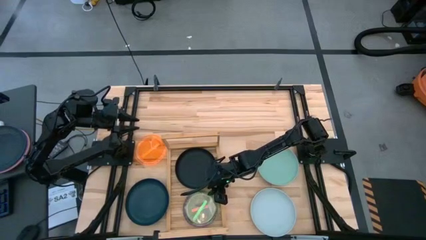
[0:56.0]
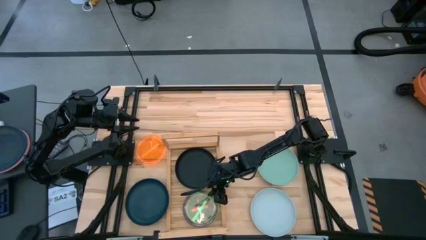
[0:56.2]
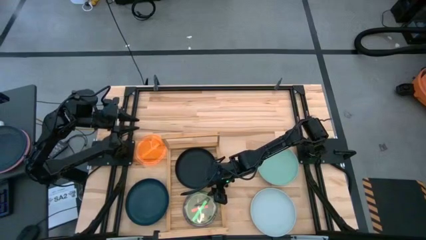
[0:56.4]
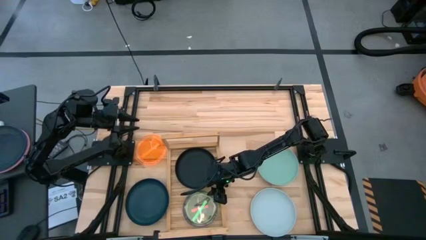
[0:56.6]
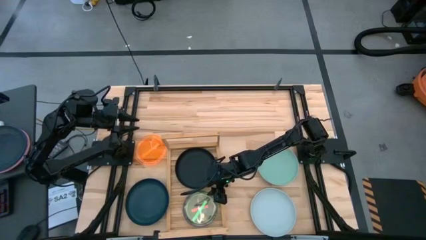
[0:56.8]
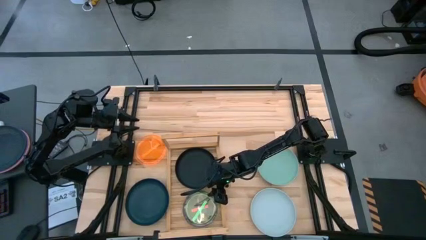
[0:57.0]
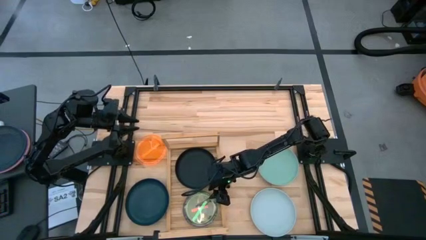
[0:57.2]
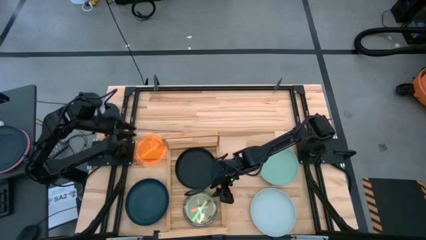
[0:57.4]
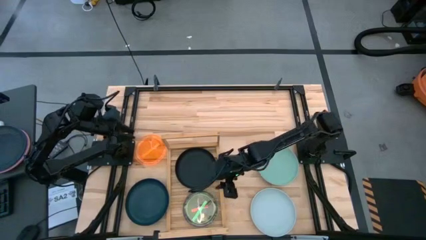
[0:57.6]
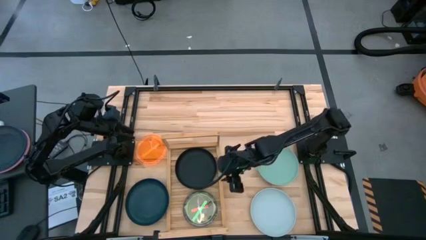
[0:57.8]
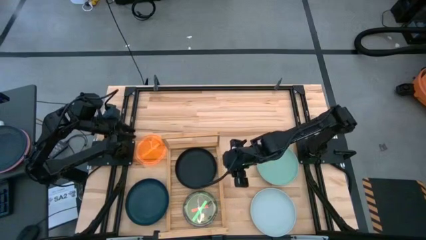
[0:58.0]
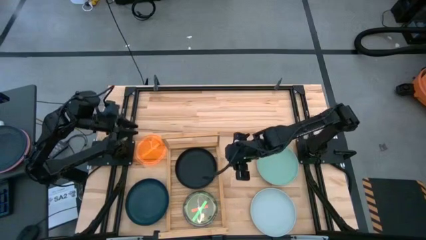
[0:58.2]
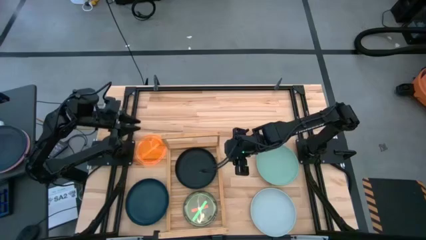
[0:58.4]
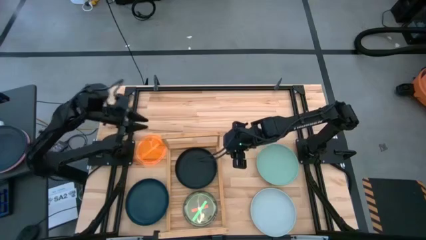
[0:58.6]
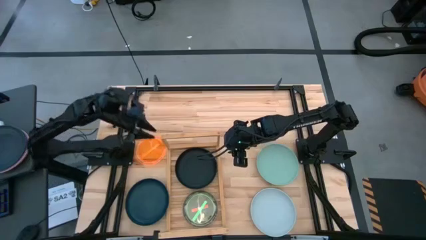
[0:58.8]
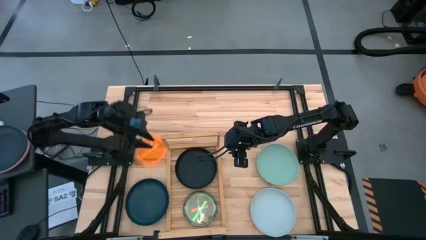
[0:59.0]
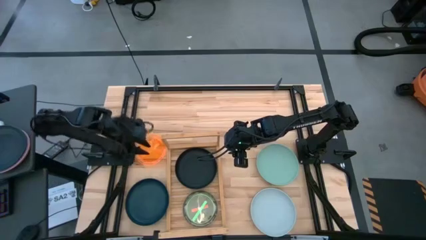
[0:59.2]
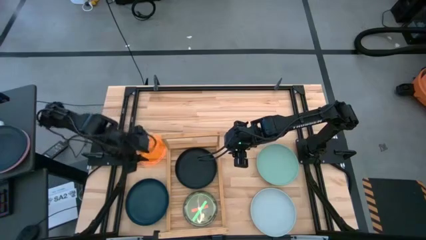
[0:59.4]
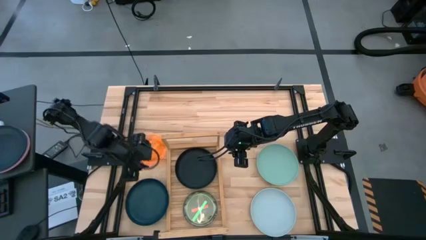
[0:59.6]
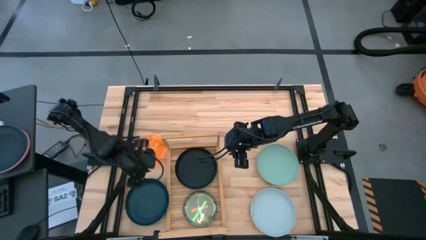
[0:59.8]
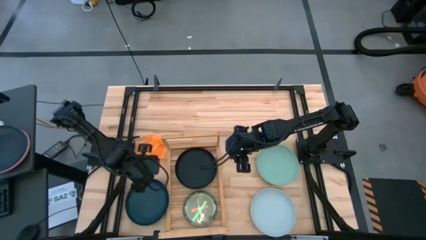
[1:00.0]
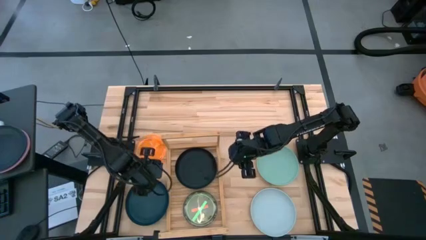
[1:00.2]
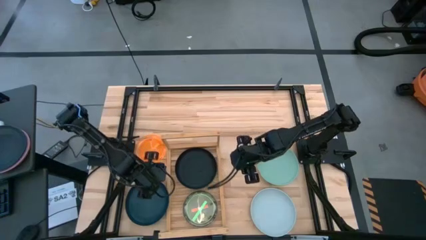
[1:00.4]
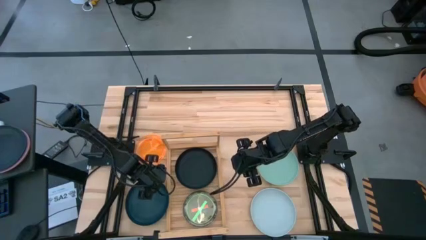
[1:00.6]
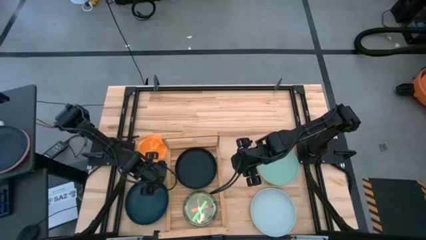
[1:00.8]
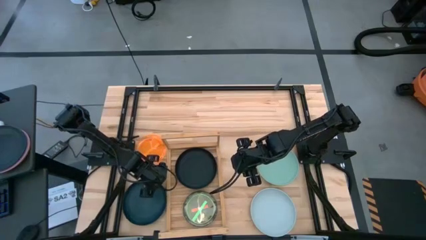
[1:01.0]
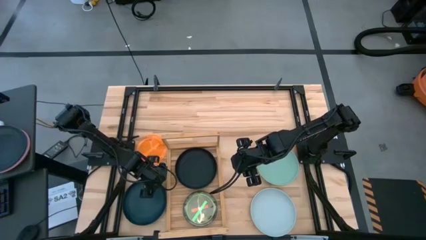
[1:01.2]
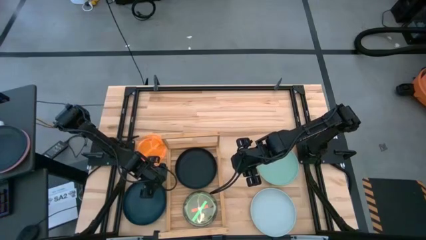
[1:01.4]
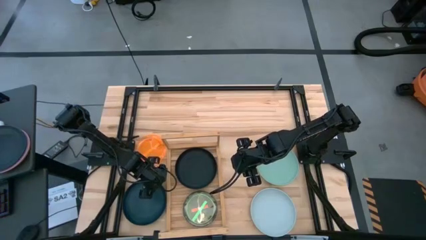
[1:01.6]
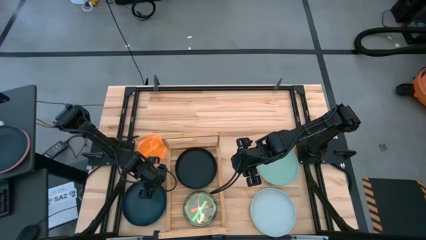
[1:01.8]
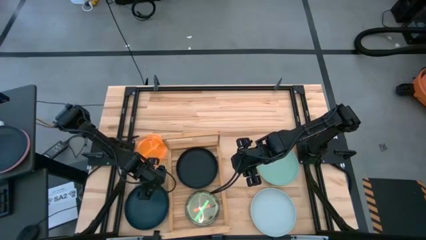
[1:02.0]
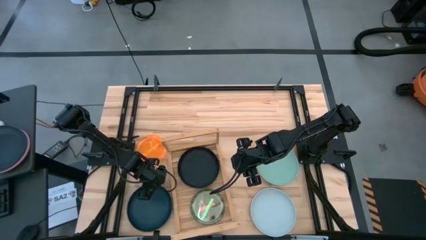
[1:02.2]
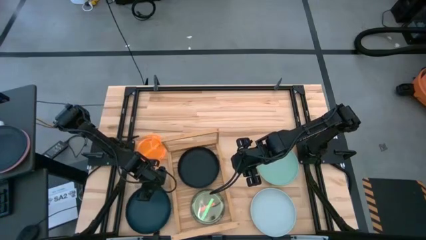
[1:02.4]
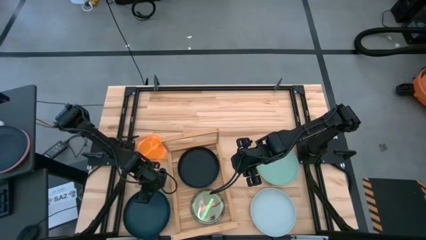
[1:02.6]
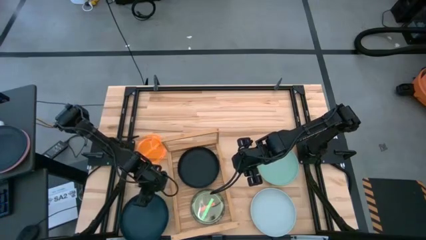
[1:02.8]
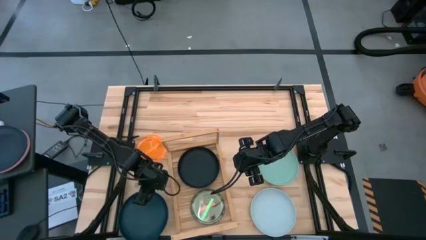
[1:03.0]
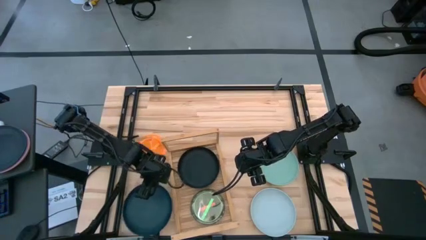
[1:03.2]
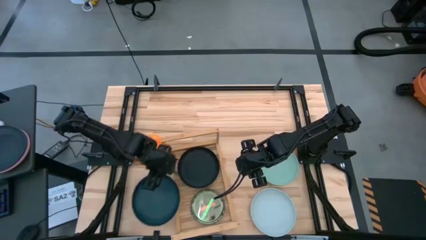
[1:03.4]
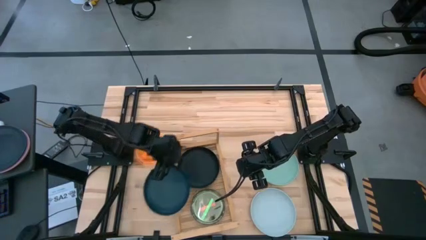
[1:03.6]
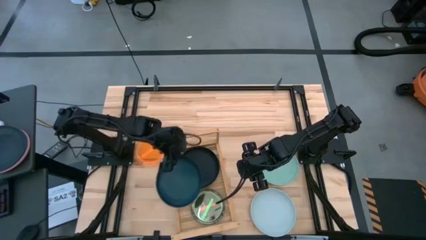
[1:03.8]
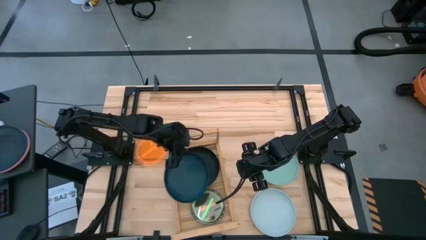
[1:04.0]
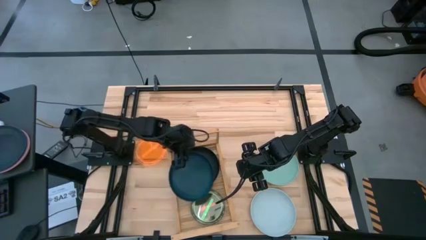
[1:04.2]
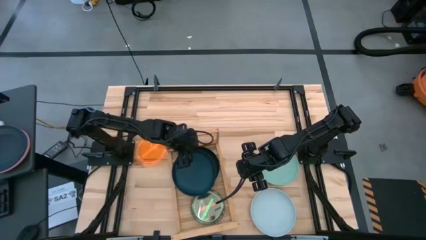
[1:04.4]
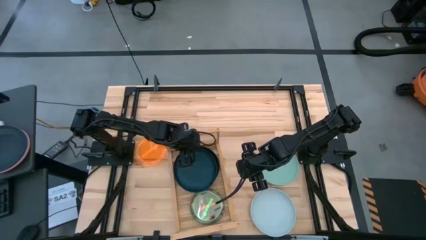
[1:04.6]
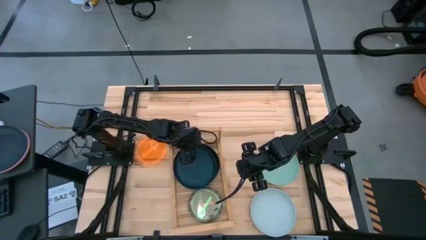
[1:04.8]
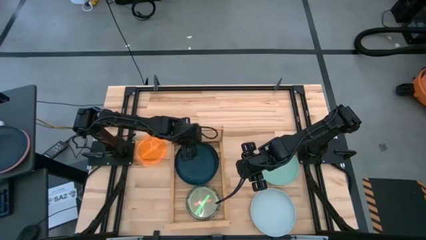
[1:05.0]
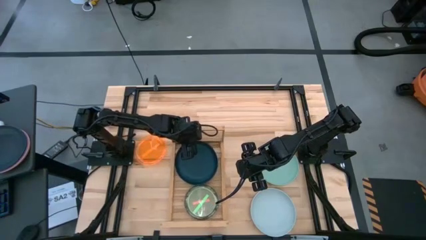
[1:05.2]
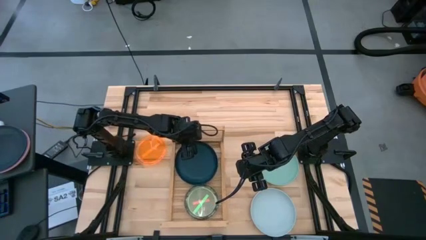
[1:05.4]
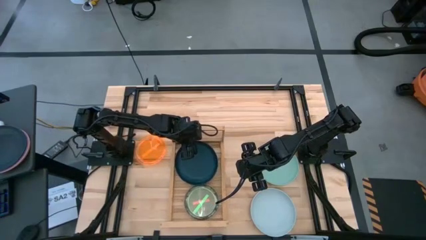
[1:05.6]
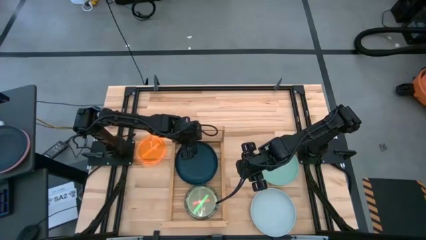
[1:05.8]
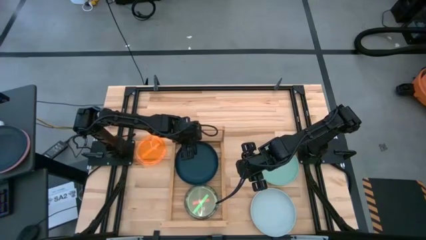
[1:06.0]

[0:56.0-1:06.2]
Task: Place and stack plates onto a shelf
Stack the big black plate on top of the big black plate on the shelf
